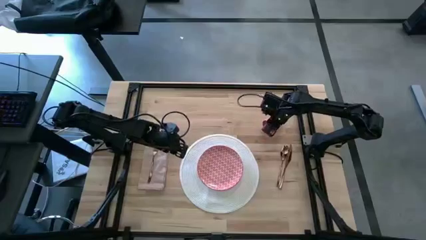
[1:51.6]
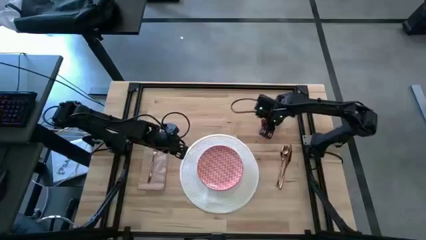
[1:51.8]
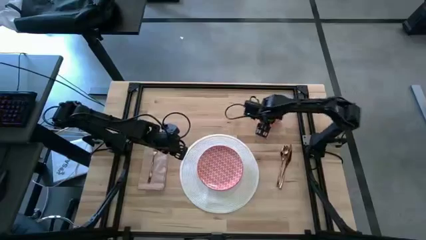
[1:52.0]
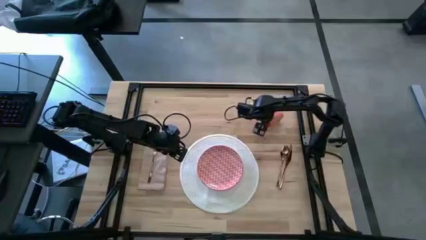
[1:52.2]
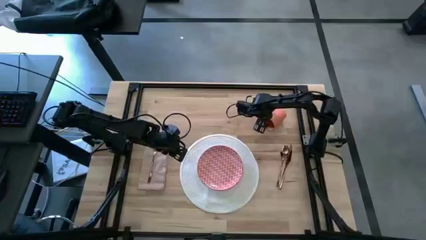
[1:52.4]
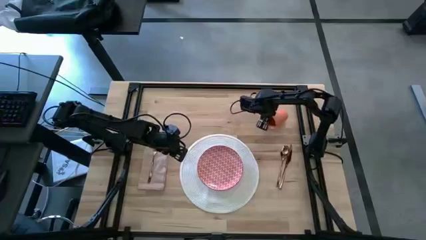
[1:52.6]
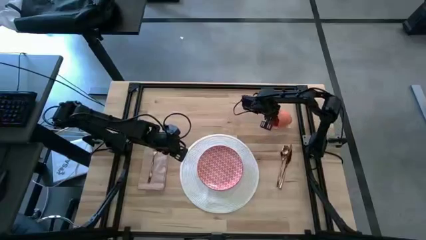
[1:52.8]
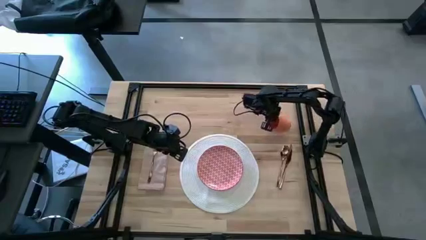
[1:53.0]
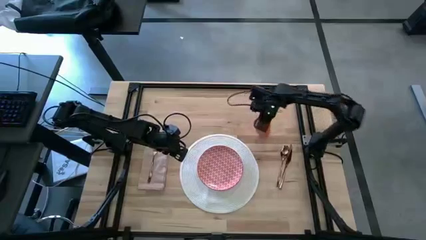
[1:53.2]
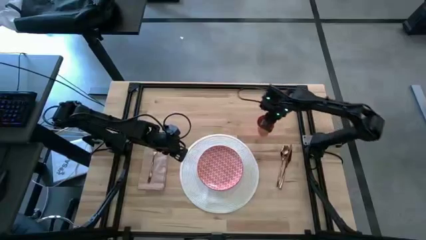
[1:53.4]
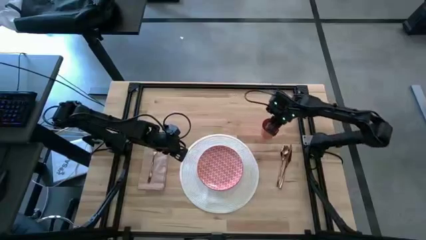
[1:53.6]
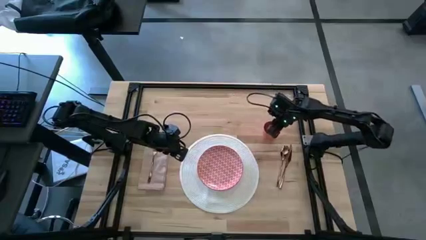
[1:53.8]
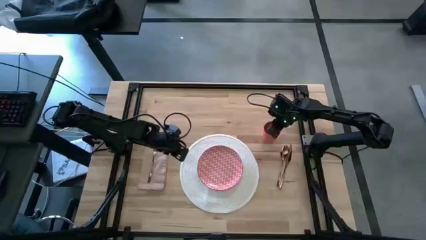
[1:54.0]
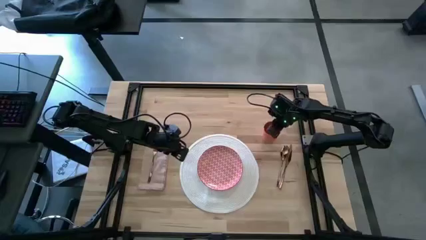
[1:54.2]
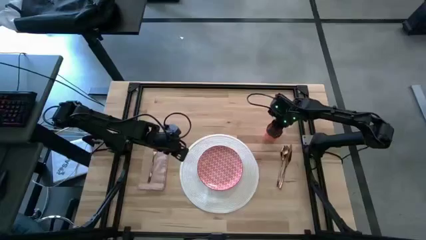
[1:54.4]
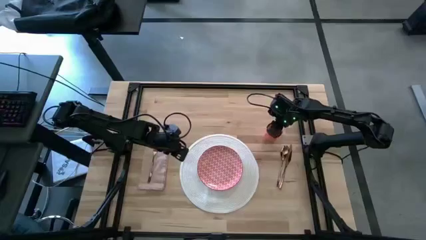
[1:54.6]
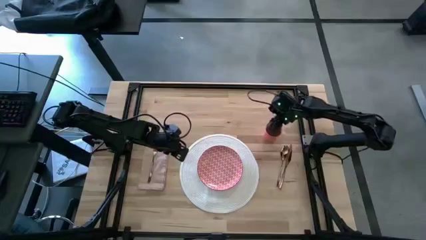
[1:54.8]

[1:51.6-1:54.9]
Task: Set table place
Put the orange cup in the middle right of the table

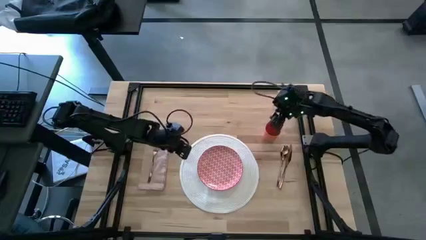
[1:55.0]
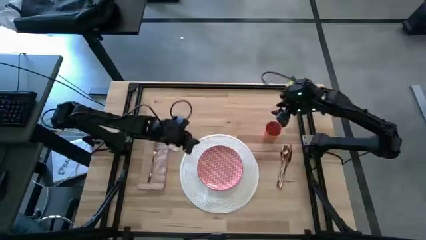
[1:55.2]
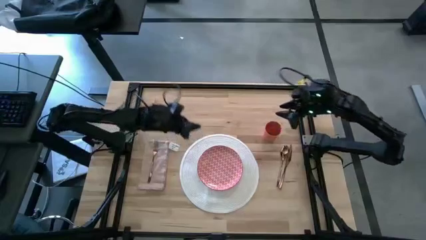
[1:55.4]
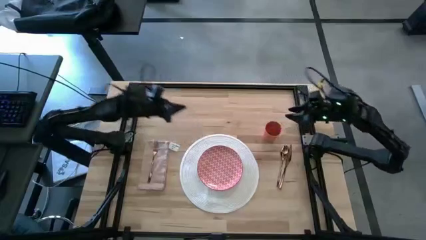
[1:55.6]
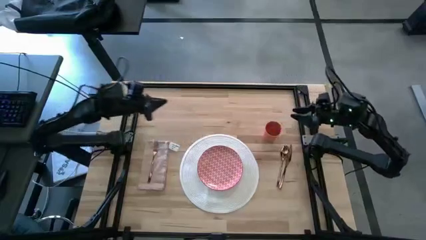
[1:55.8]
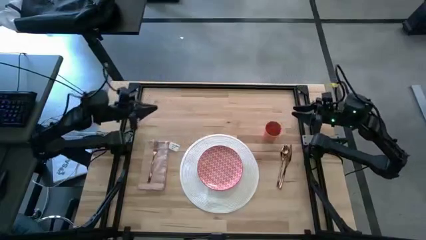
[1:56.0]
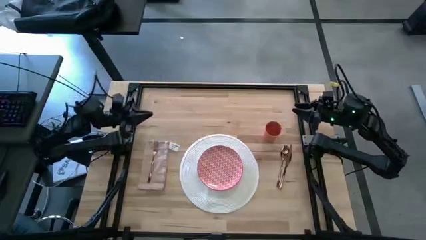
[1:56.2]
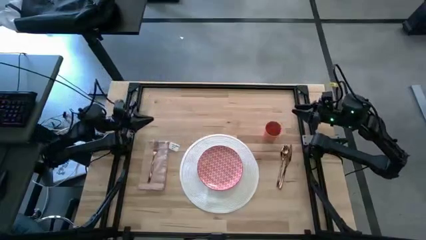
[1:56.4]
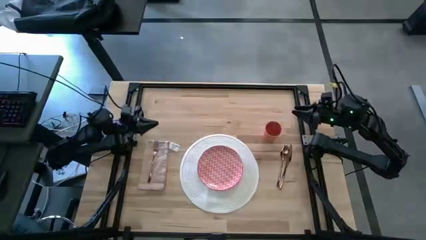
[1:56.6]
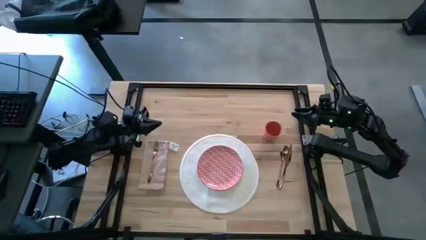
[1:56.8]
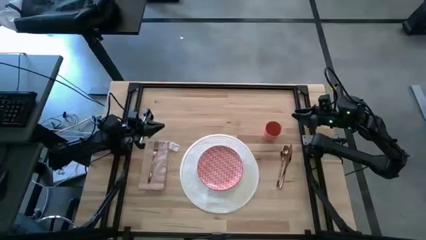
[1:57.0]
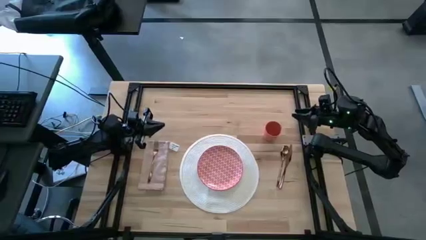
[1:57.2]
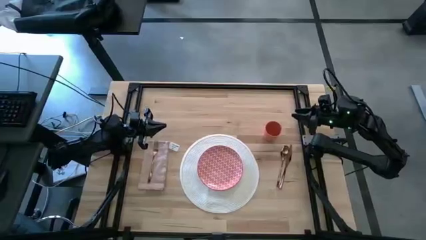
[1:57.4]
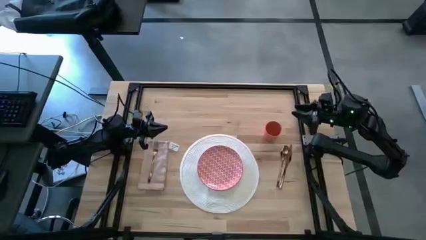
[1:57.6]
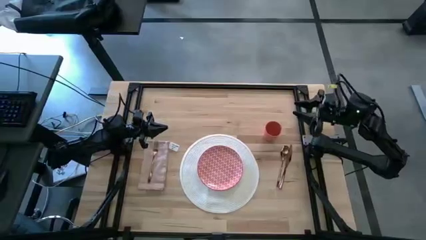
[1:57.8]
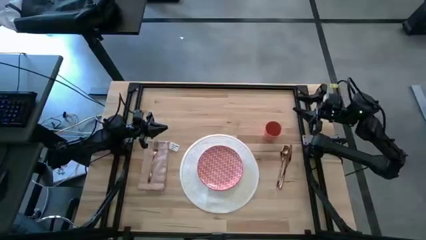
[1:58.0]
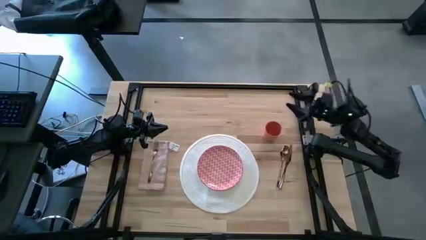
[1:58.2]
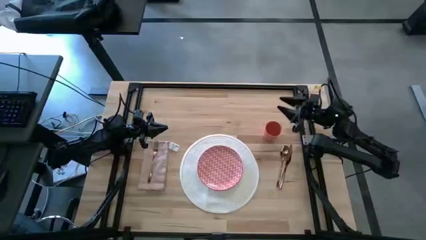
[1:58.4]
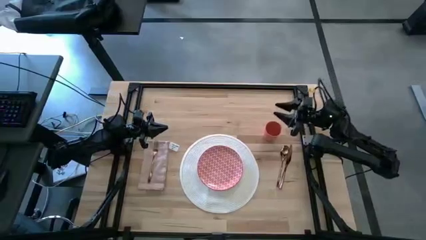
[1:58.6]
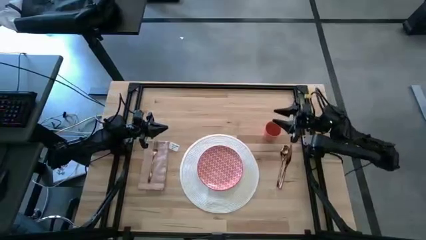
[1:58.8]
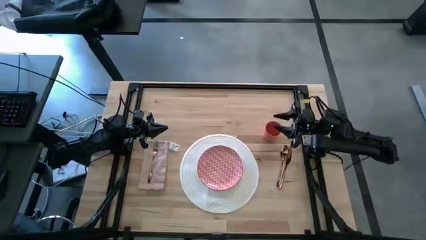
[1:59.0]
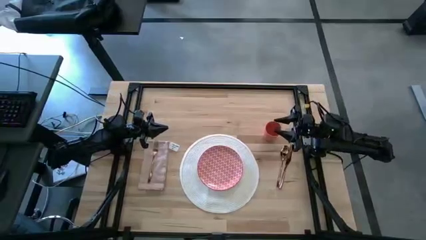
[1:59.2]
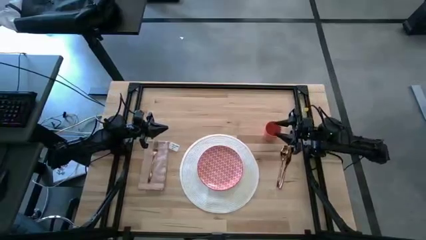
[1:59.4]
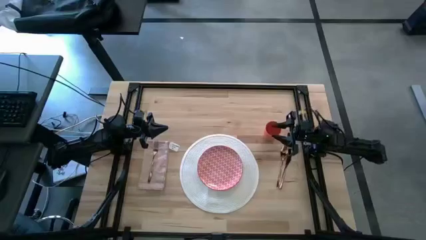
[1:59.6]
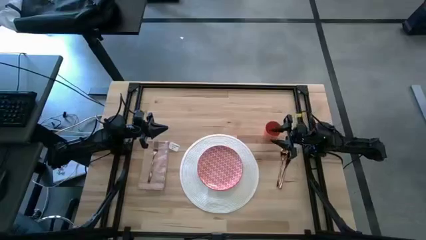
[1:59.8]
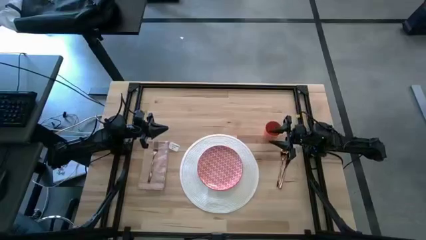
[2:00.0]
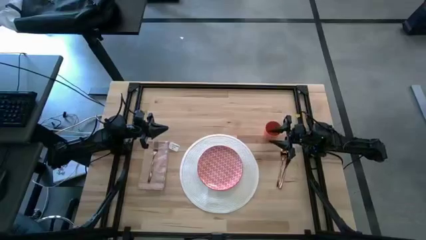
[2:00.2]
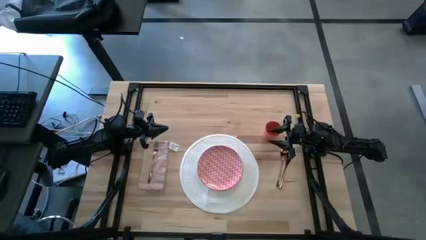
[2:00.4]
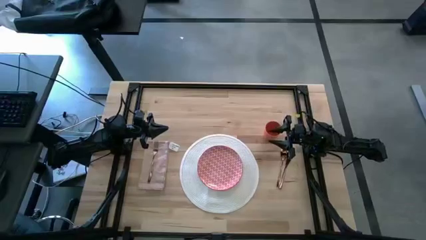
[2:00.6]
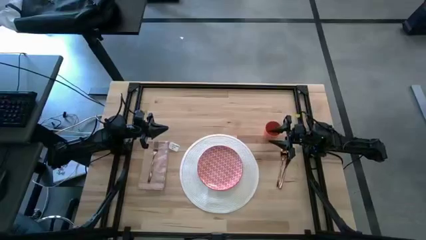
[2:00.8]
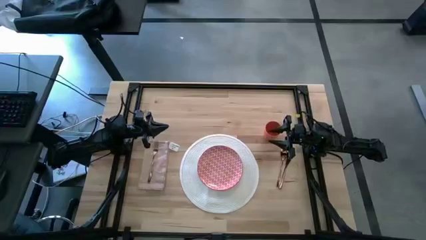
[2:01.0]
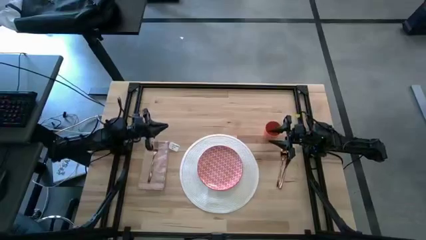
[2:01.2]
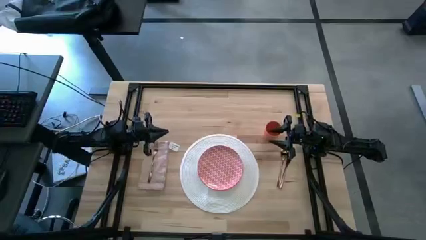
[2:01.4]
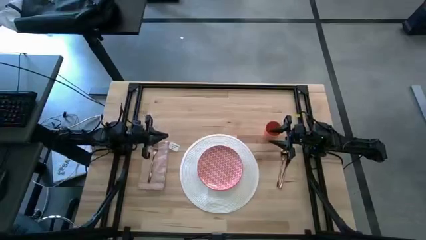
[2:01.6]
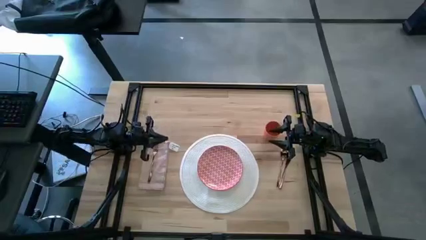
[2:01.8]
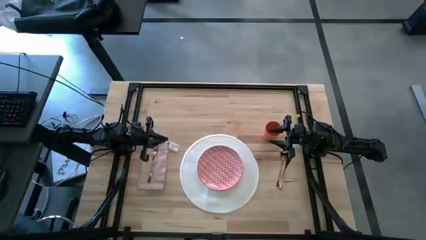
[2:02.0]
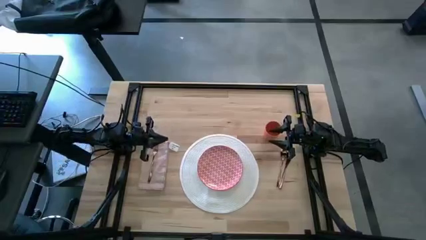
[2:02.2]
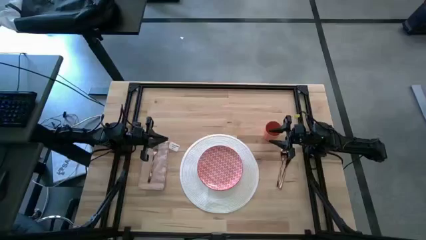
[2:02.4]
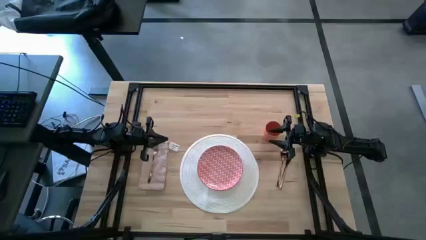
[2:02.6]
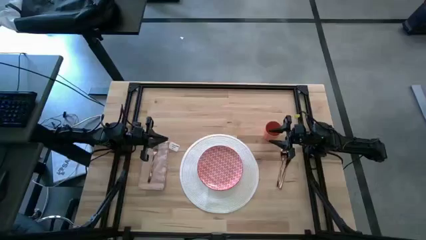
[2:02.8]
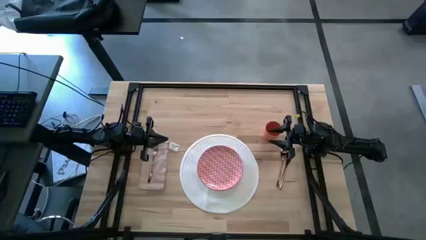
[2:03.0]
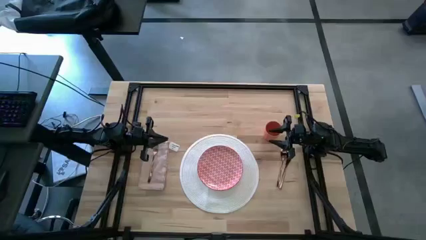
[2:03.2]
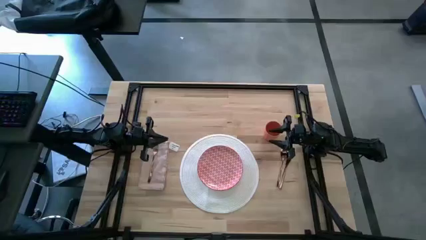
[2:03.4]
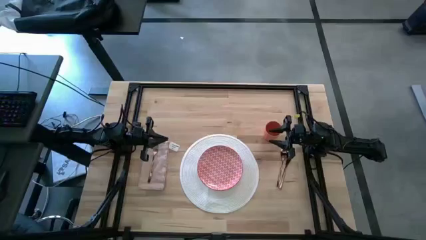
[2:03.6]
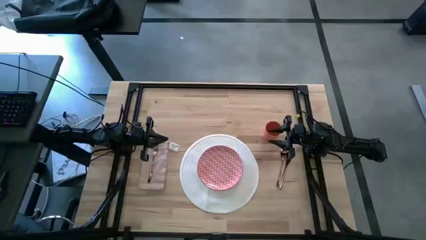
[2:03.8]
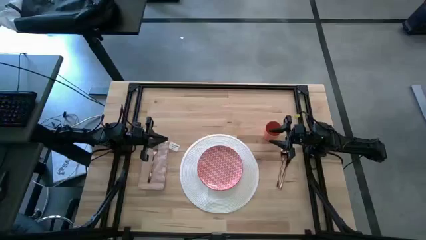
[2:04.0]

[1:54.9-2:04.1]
Return to Home Position
